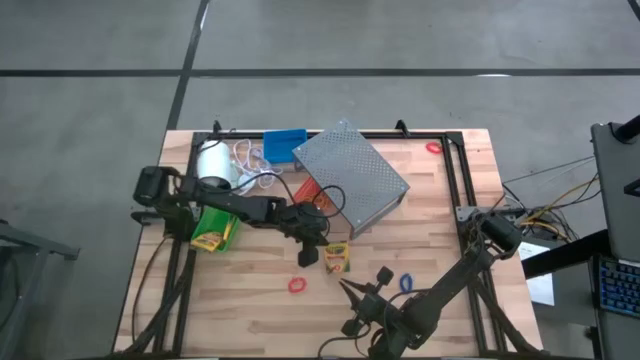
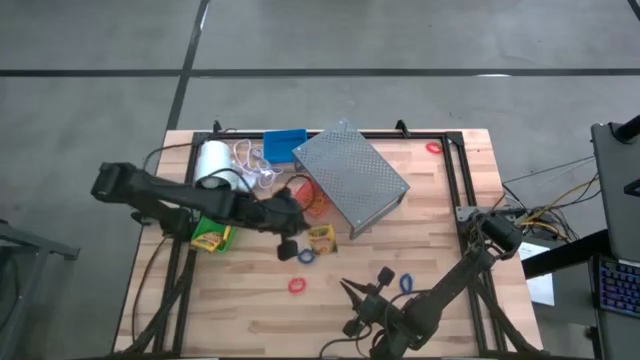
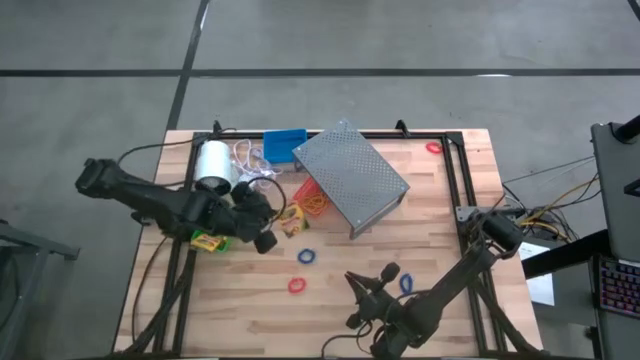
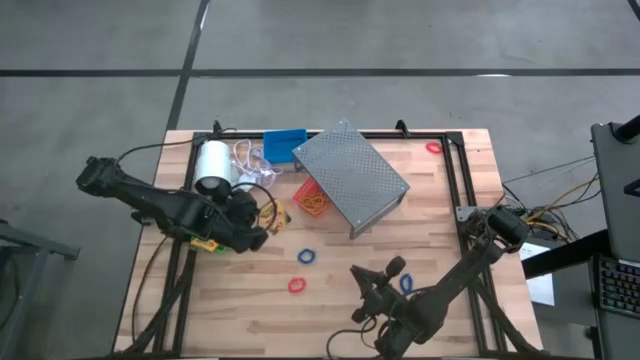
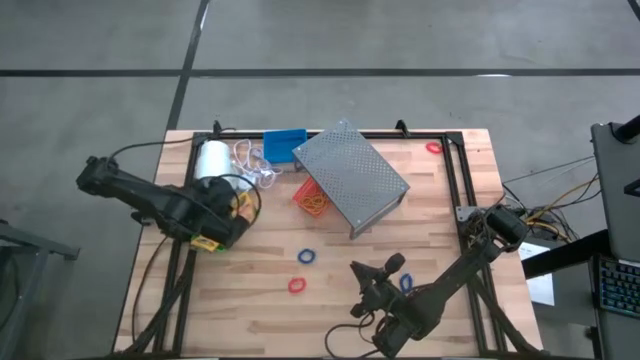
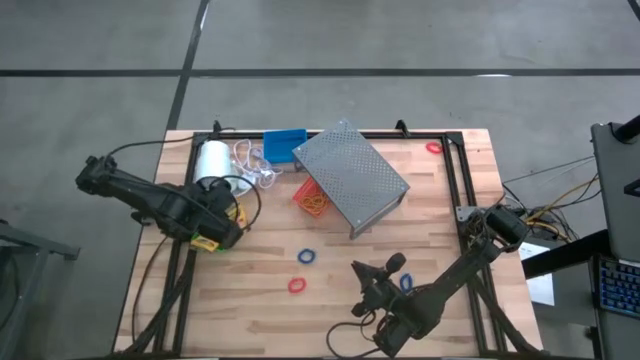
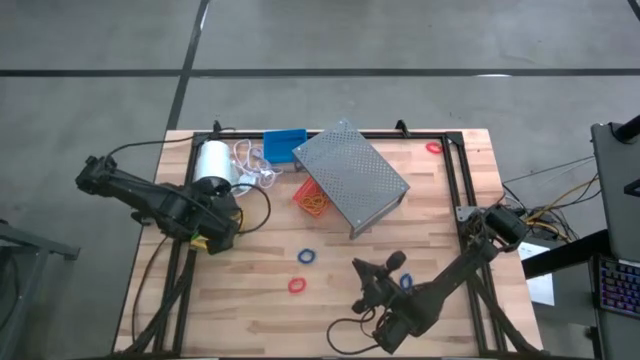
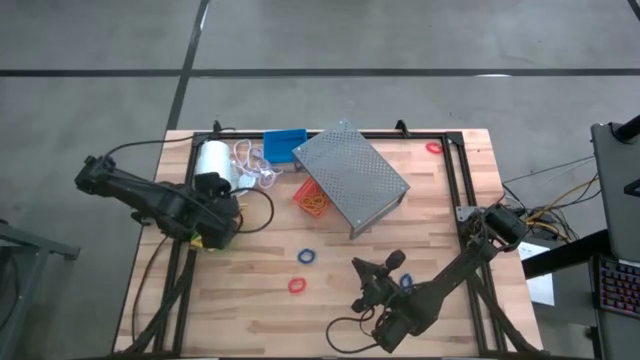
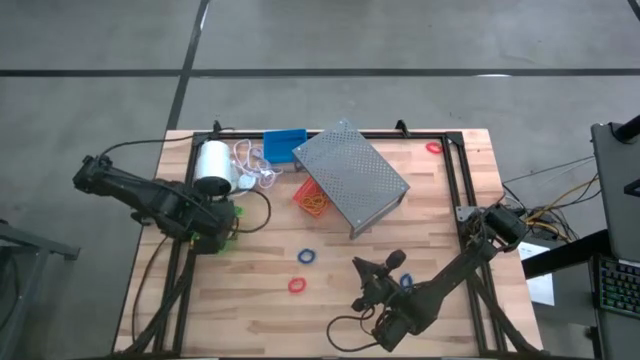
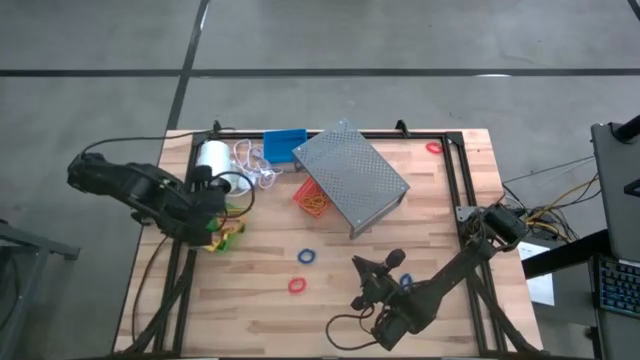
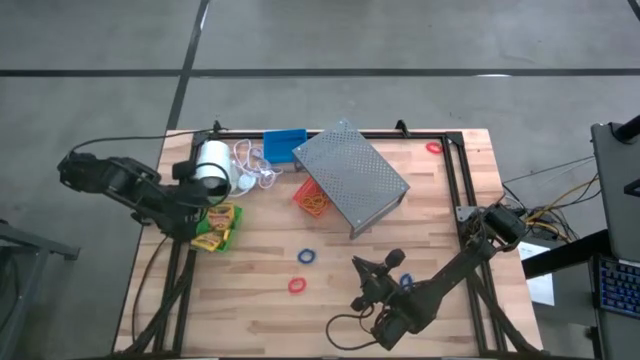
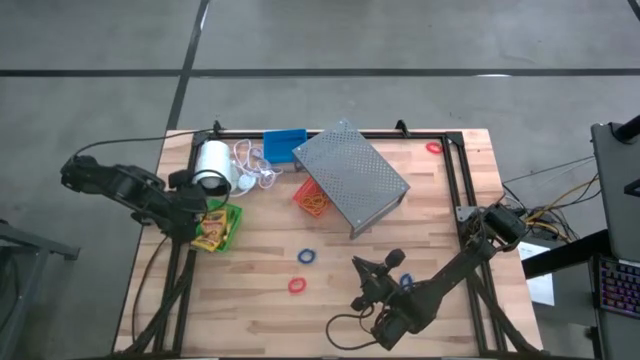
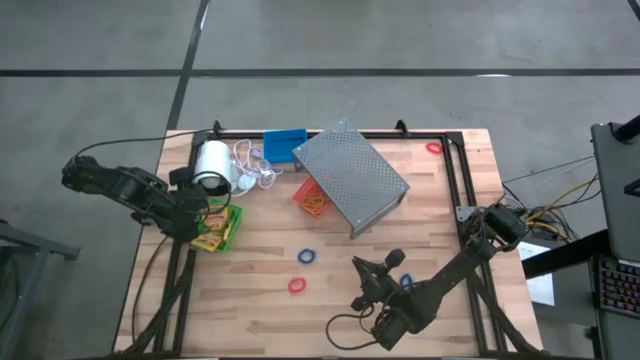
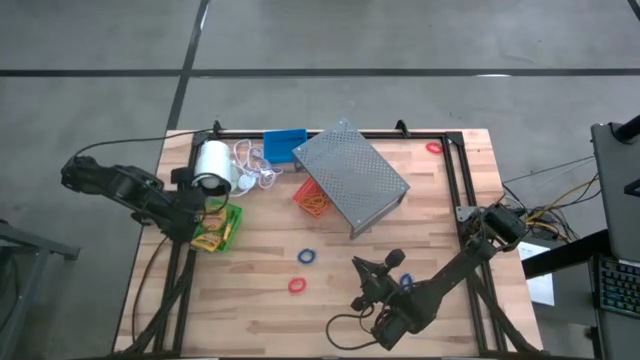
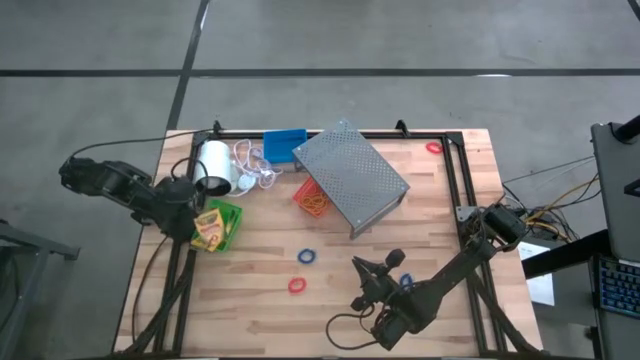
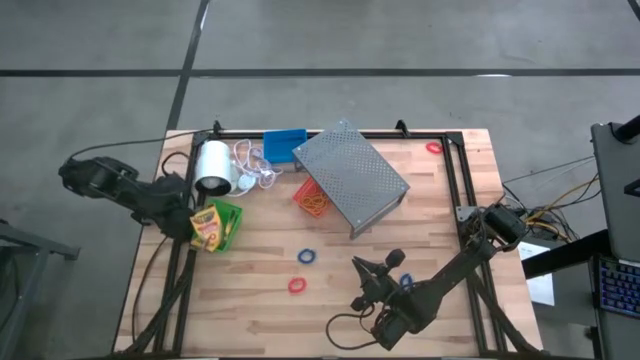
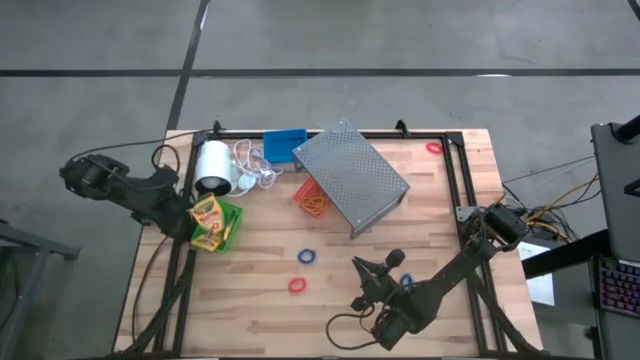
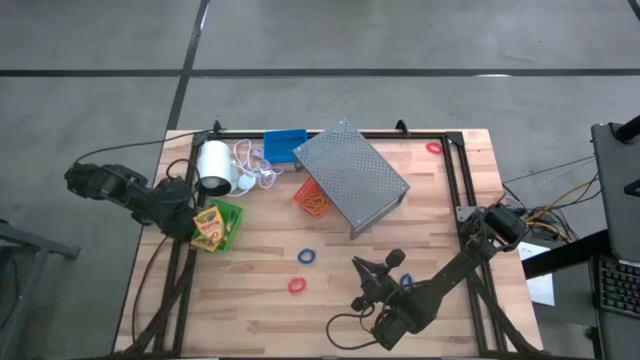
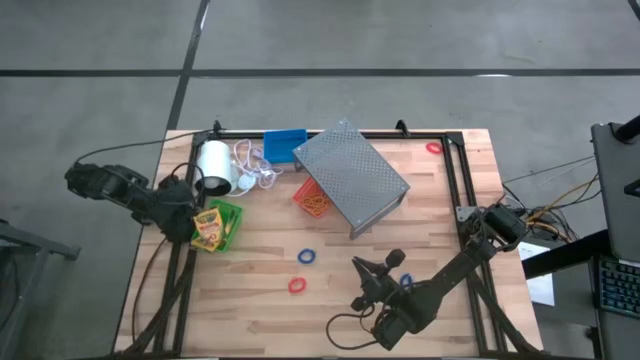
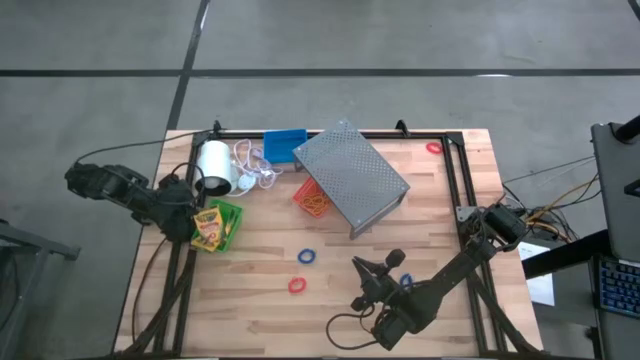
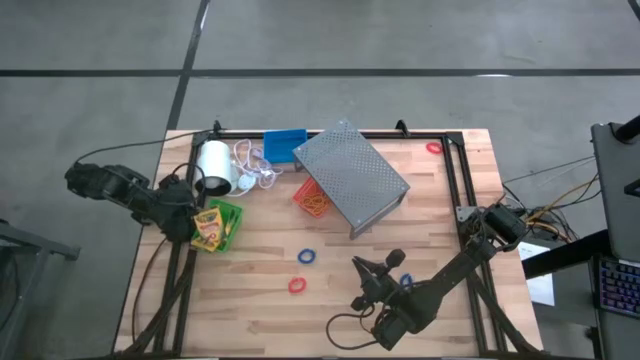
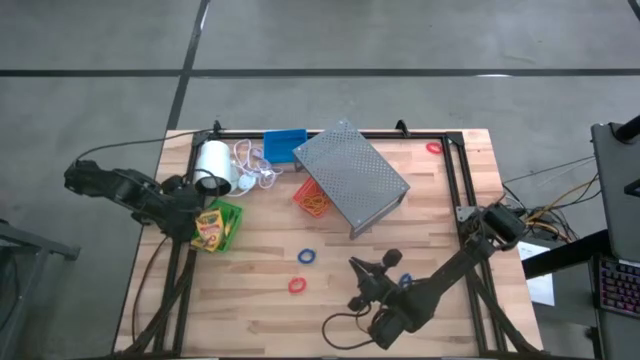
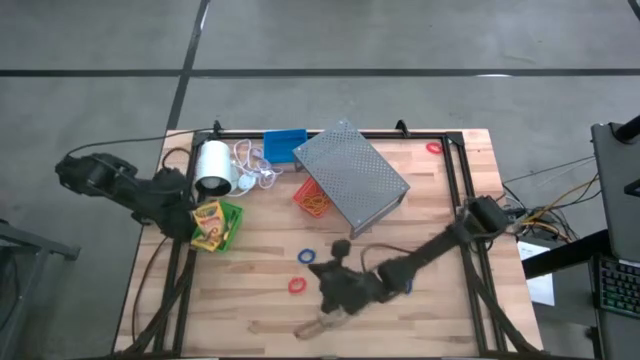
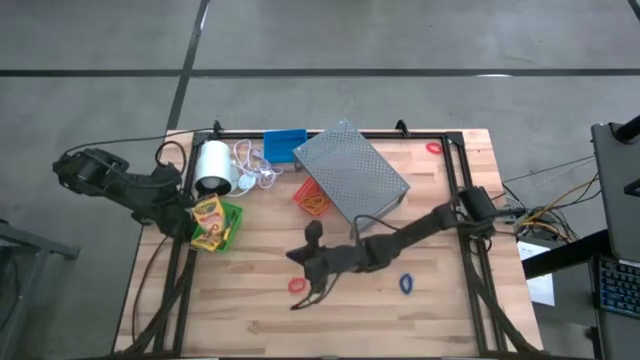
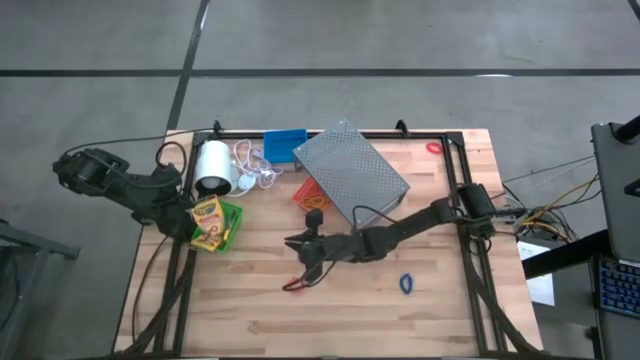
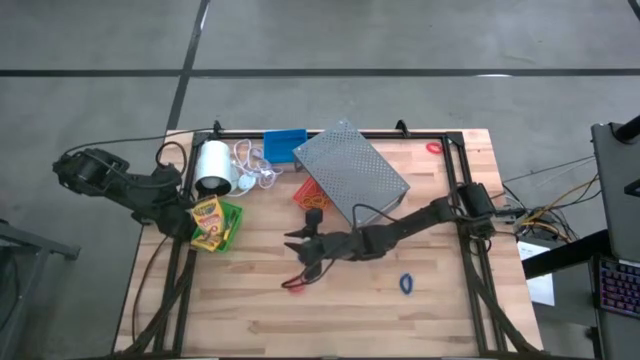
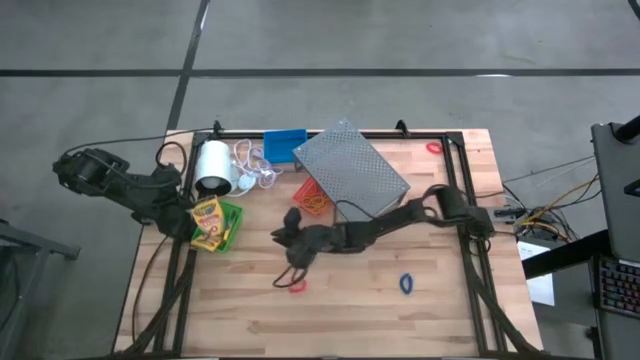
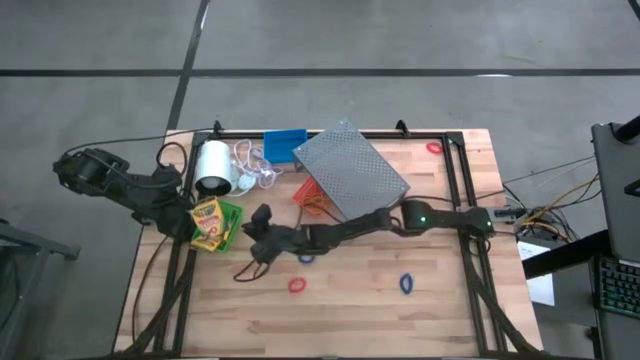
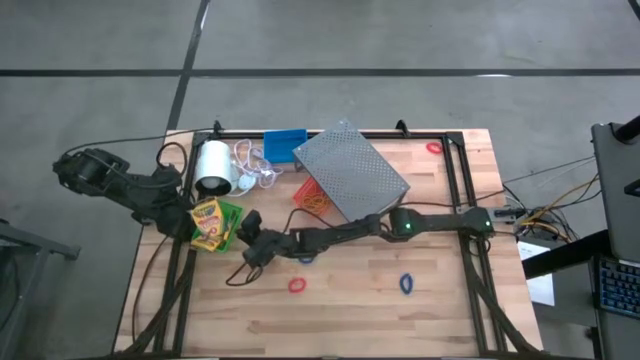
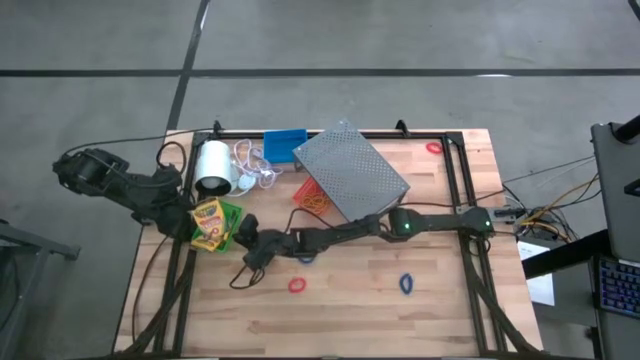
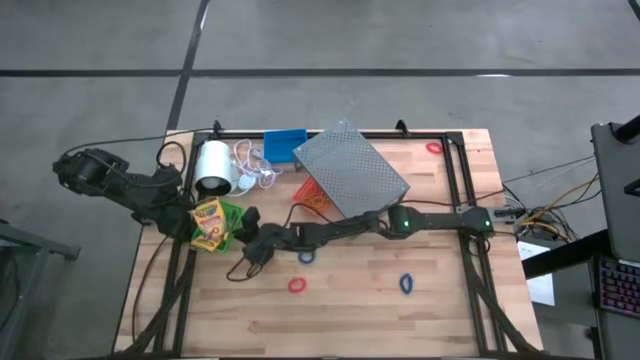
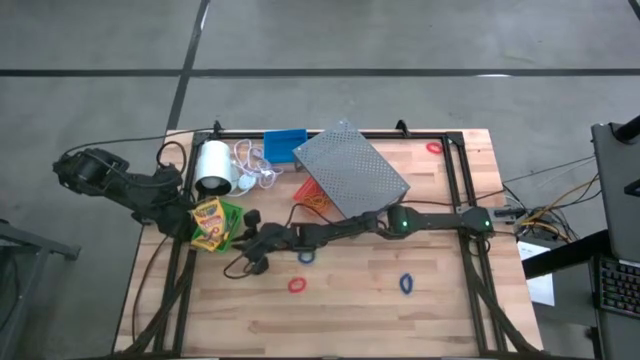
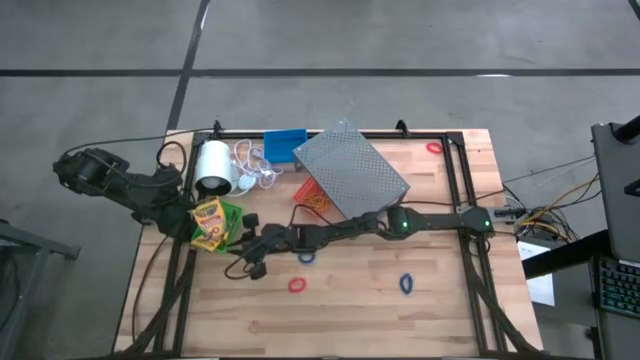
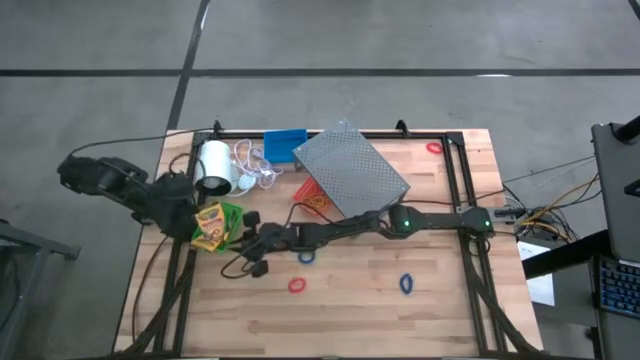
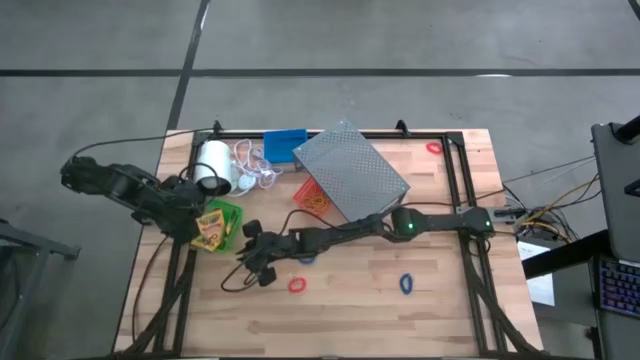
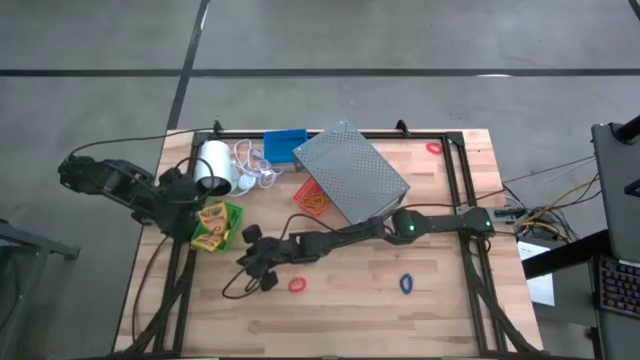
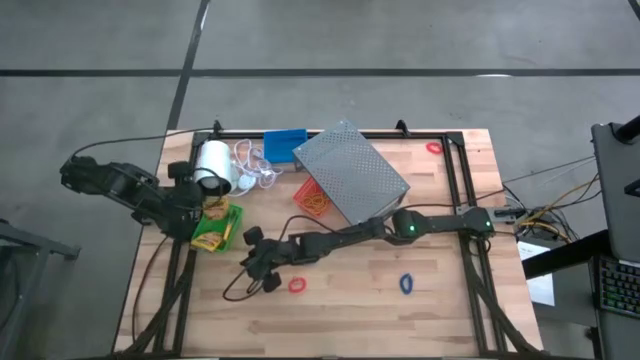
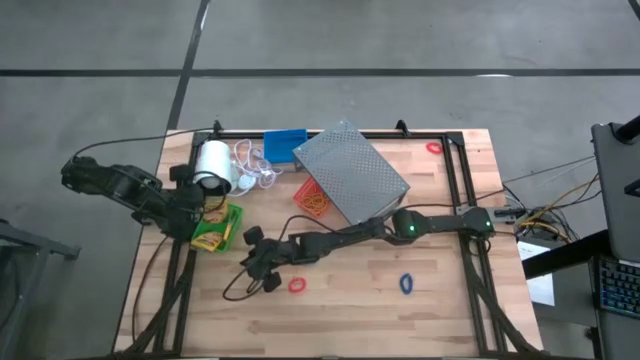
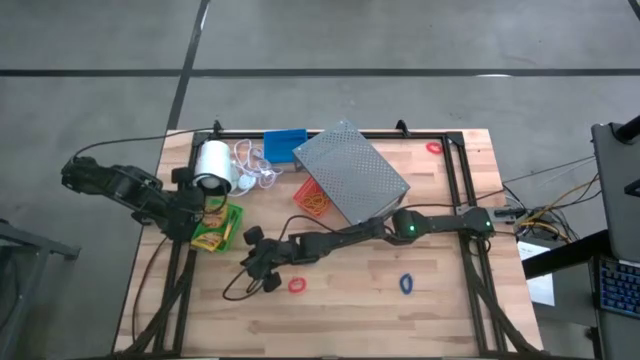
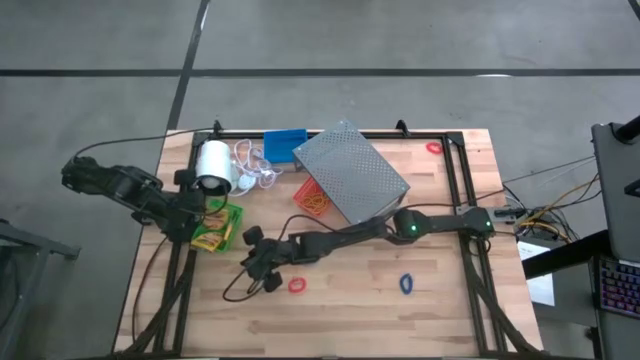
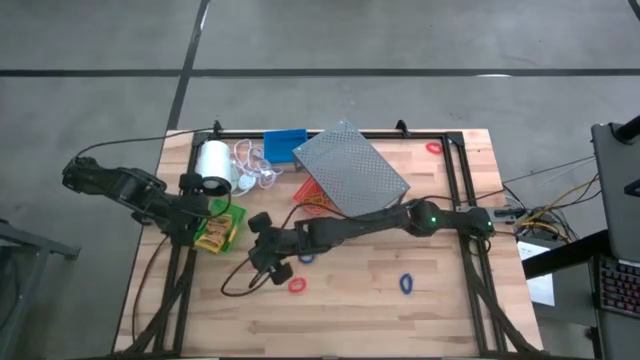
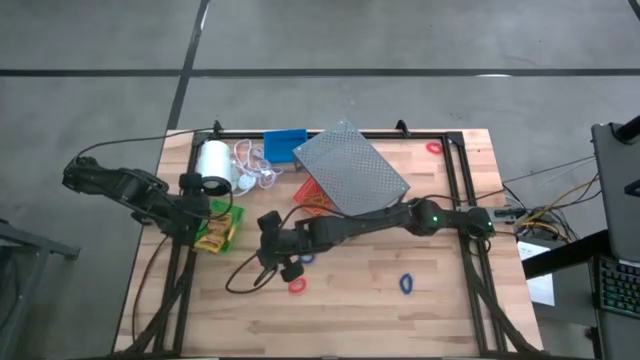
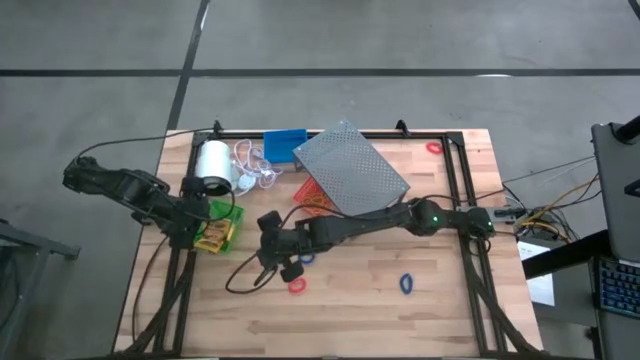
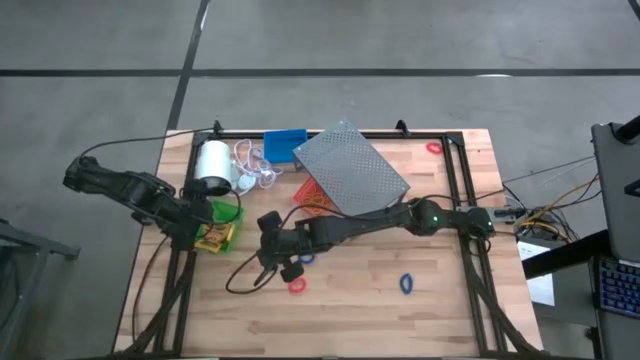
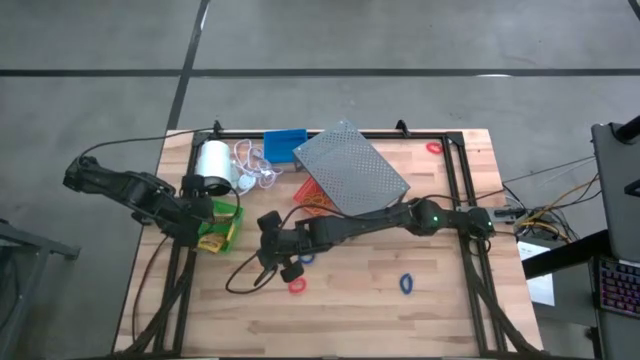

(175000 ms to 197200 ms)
Task: Pick & Place Office Desk Supplies
Put the crayon box into the green bin
